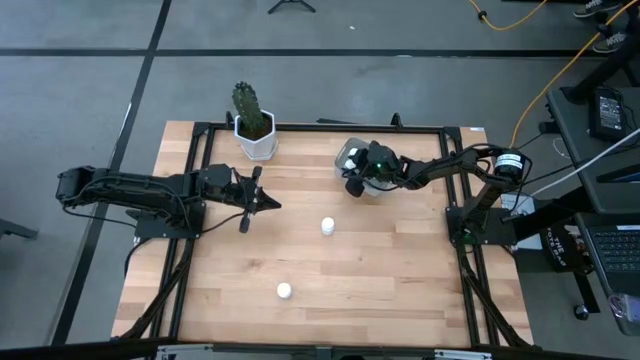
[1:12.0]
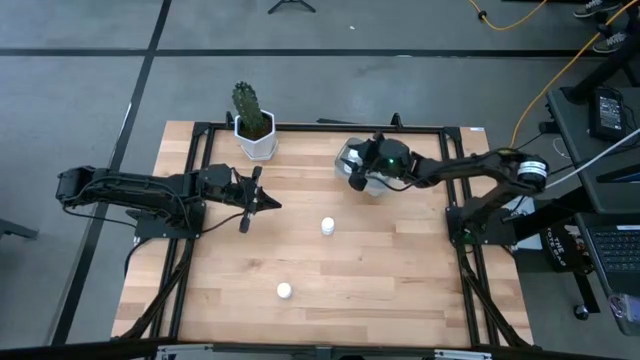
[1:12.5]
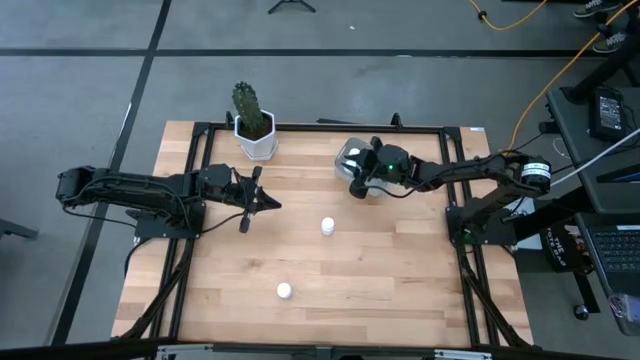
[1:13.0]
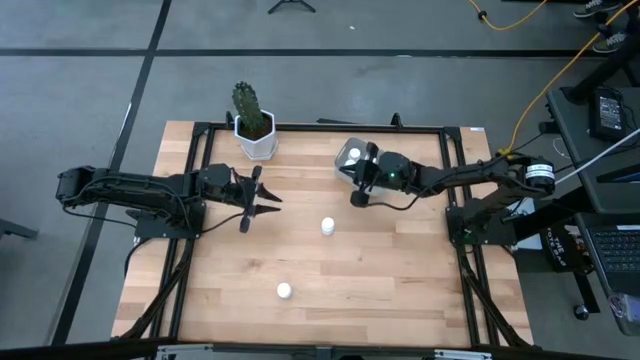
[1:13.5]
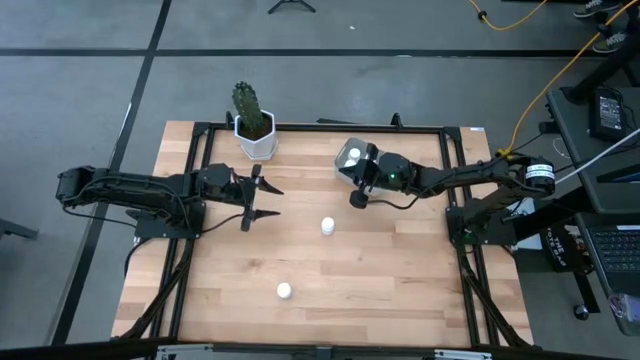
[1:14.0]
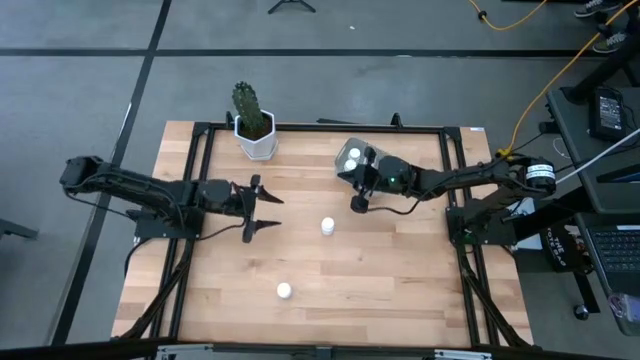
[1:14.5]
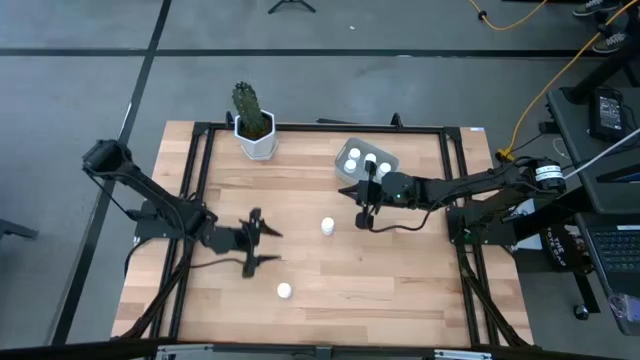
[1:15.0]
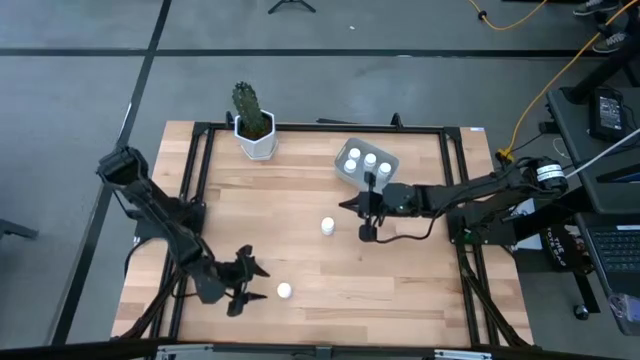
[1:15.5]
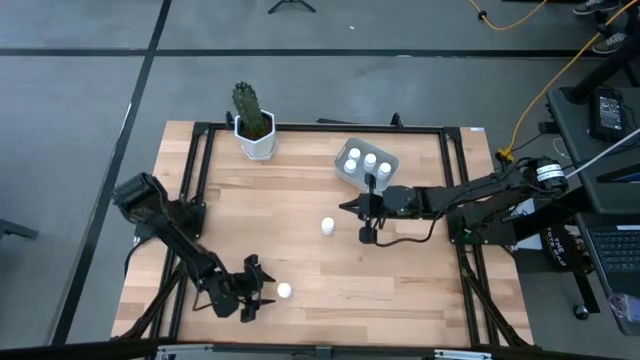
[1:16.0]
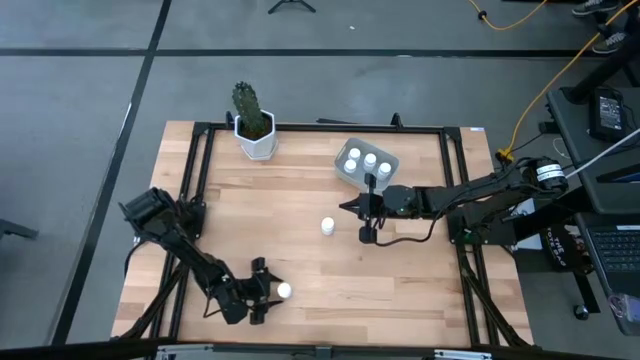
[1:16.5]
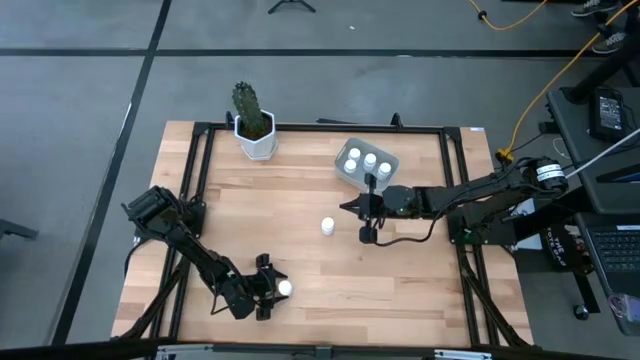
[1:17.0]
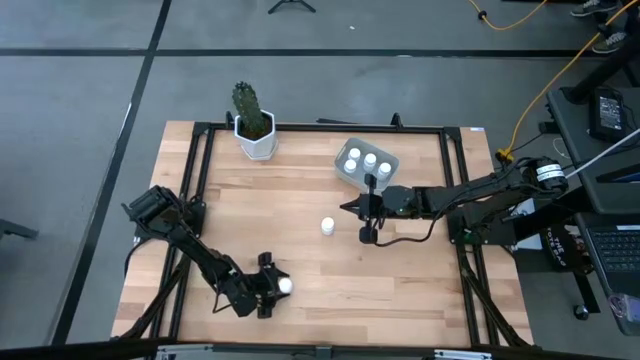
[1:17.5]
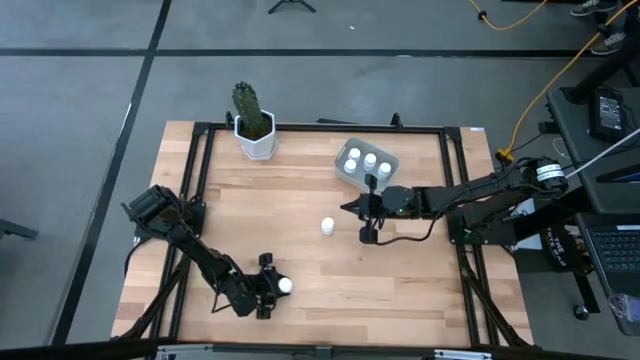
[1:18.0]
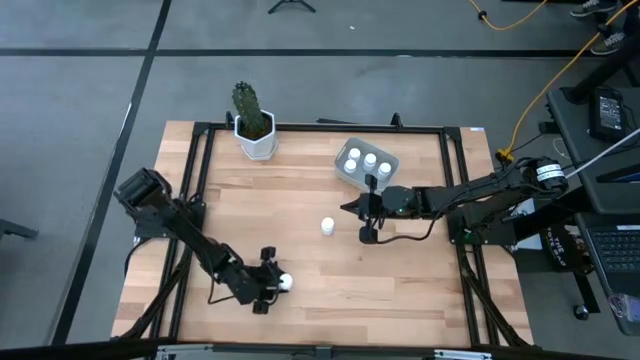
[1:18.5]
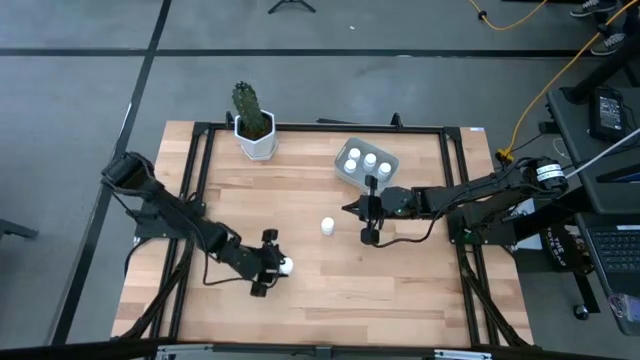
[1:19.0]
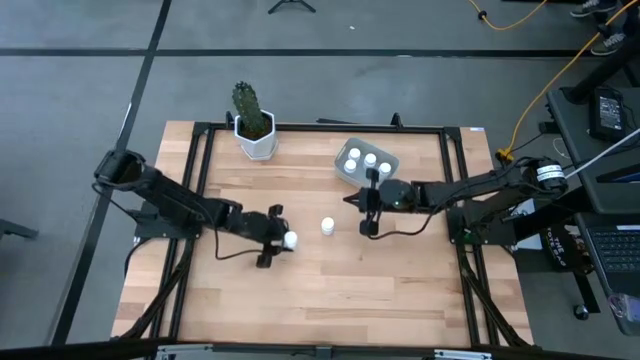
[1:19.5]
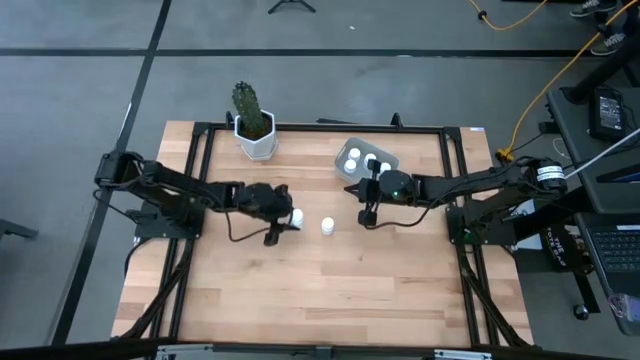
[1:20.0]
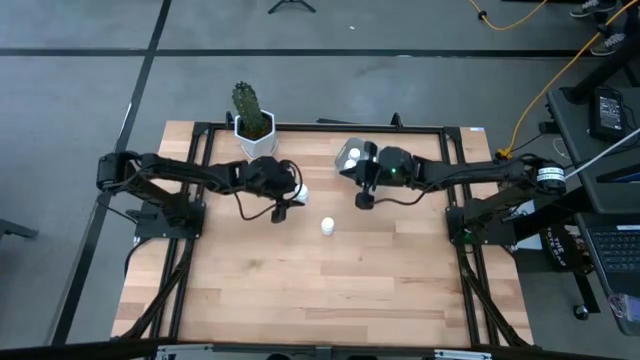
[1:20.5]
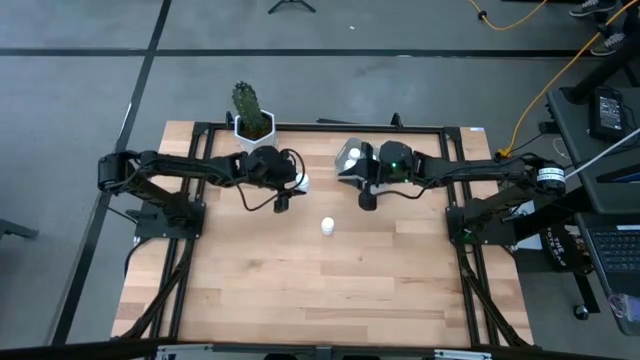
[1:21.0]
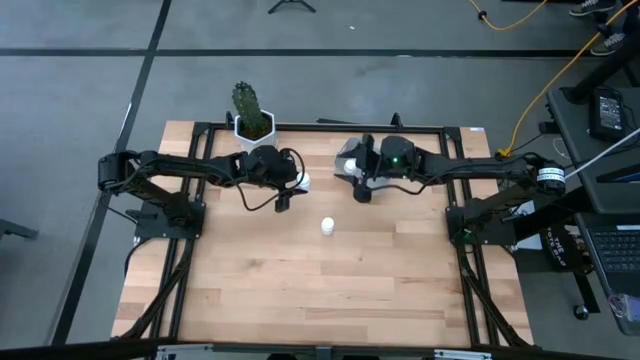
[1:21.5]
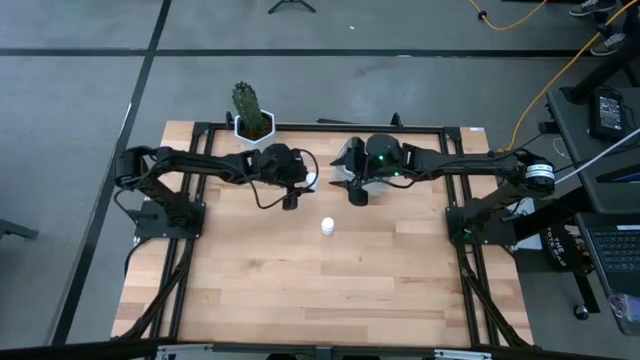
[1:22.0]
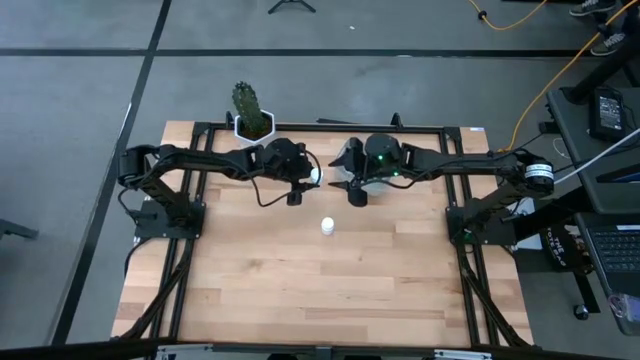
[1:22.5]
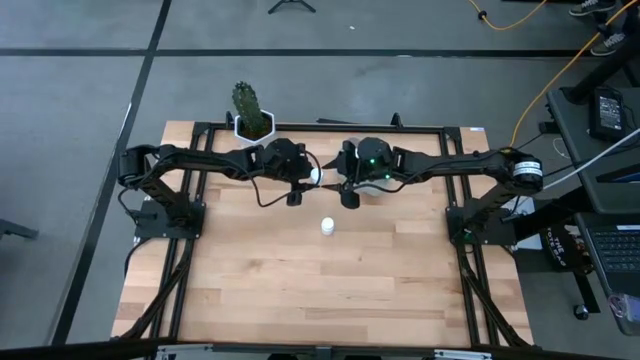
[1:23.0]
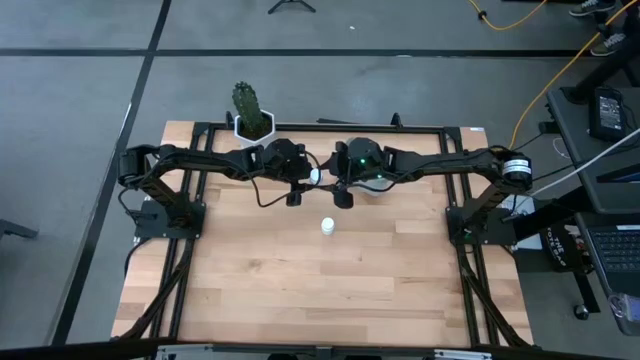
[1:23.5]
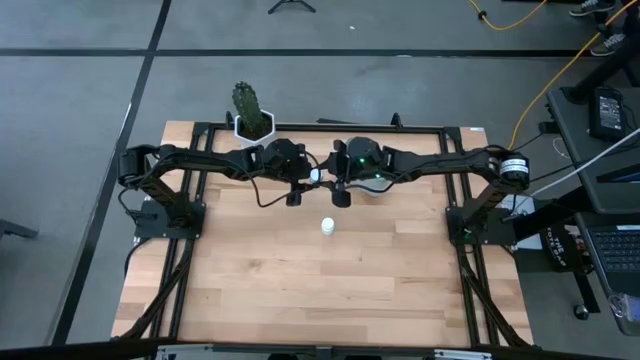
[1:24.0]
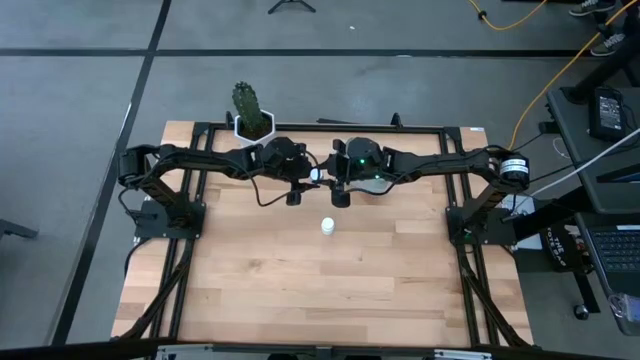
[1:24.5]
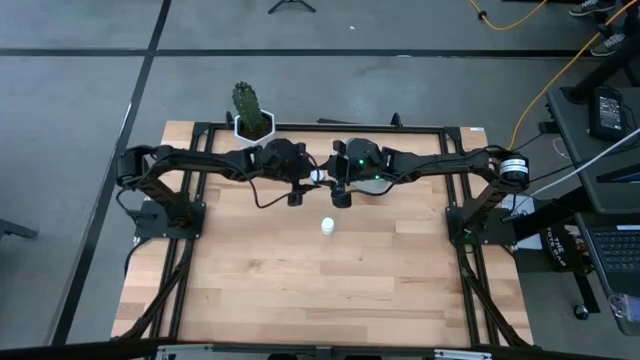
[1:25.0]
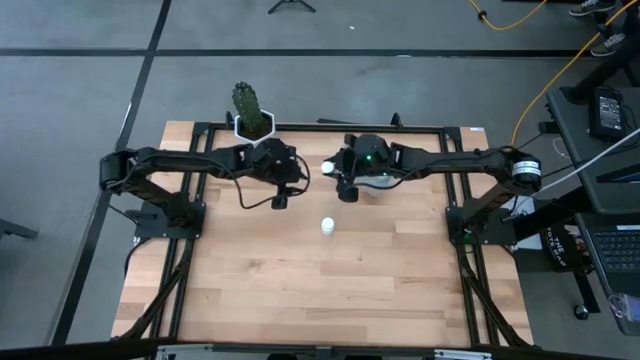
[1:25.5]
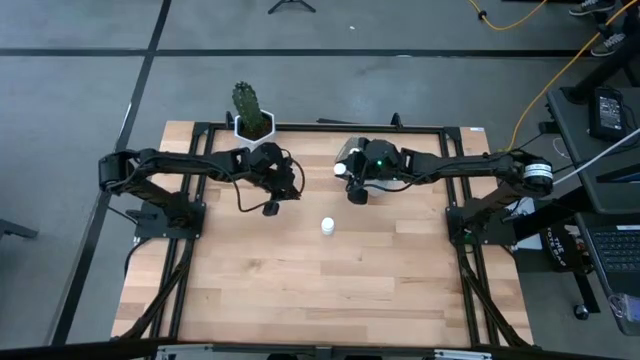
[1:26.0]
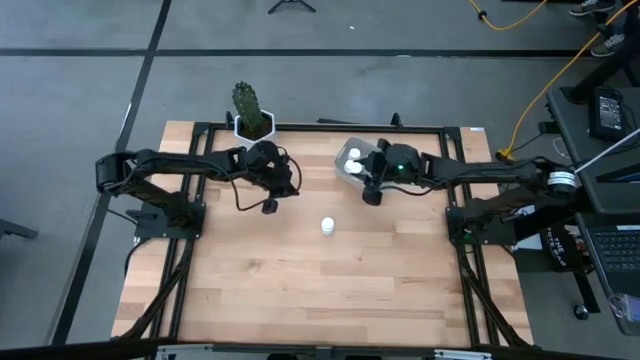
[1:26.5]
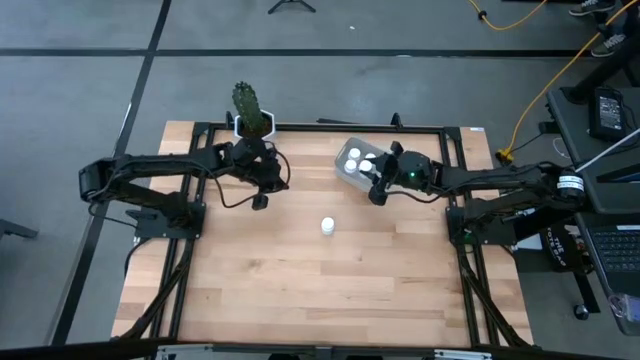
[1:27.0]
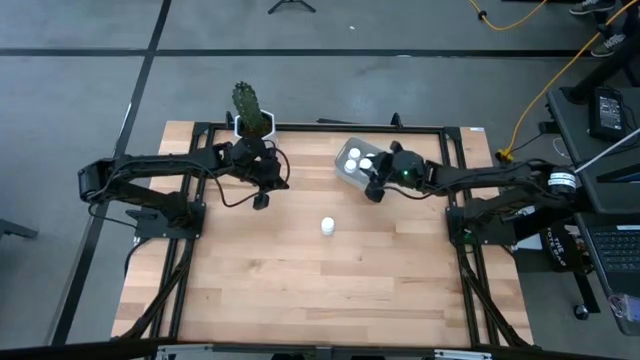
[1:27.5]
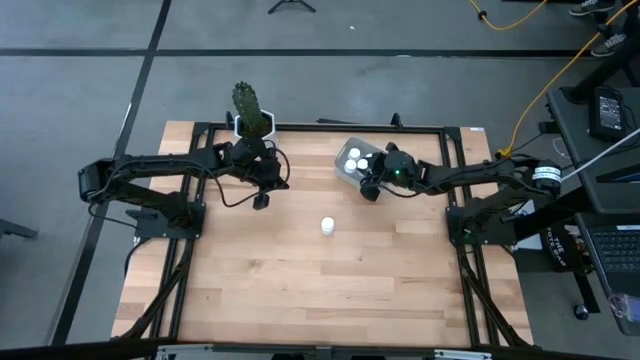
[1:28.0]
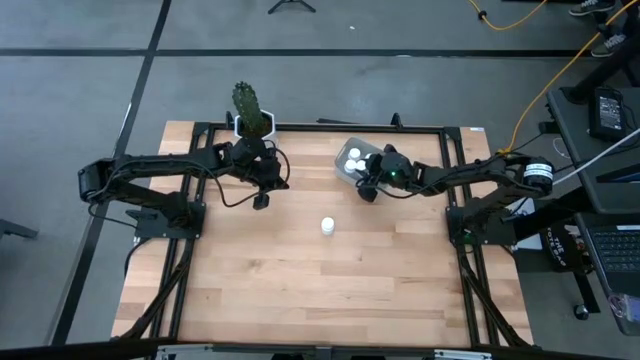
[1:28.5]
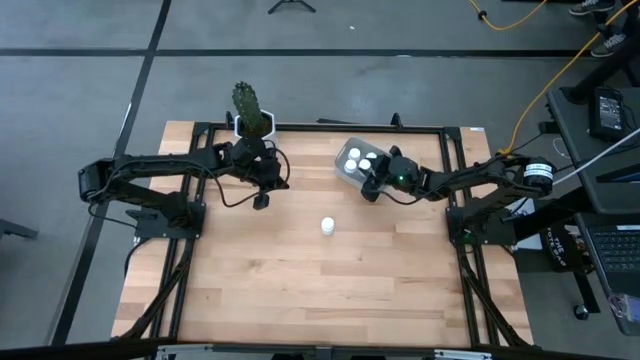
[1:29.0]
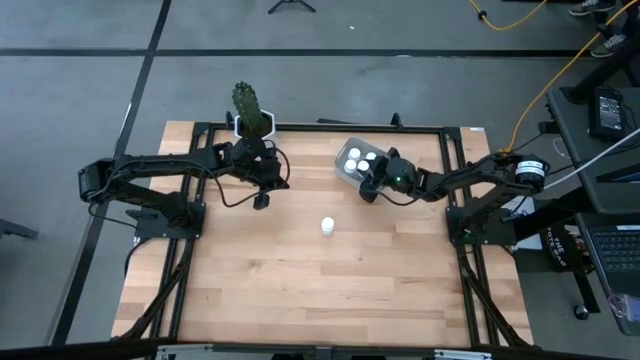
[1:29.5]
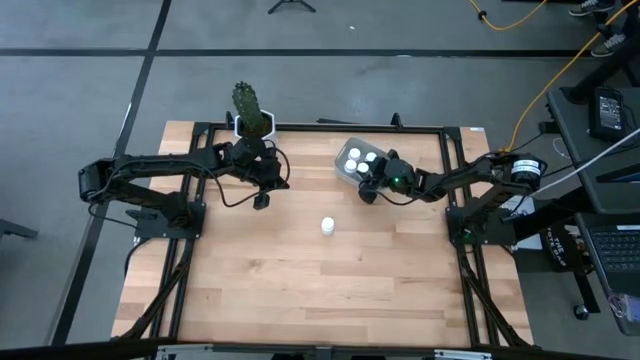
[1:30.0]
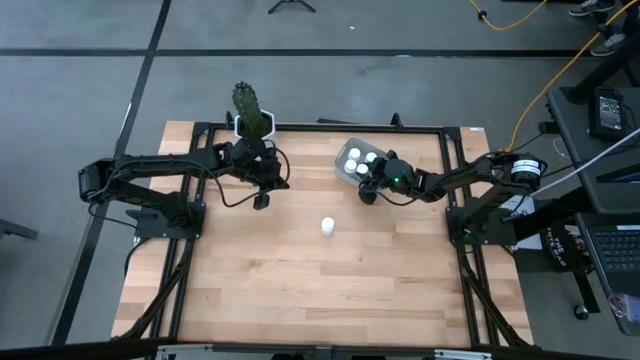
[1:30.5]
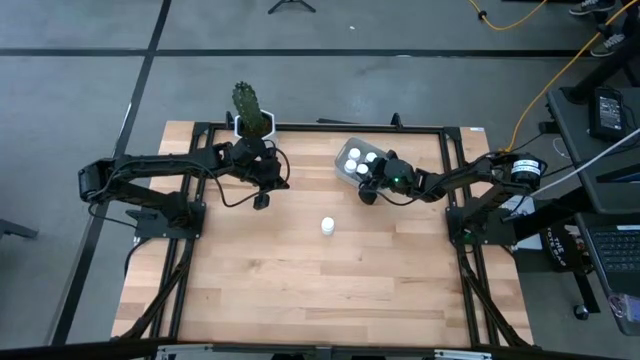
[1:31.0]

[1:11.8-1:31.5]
Task: Pick and place pill bottles into a basket
Put the white pill bottle into the gray bin

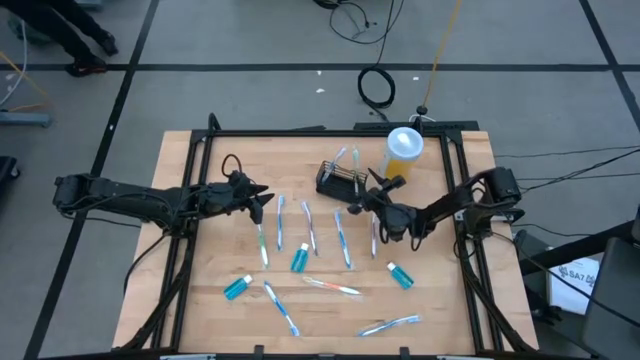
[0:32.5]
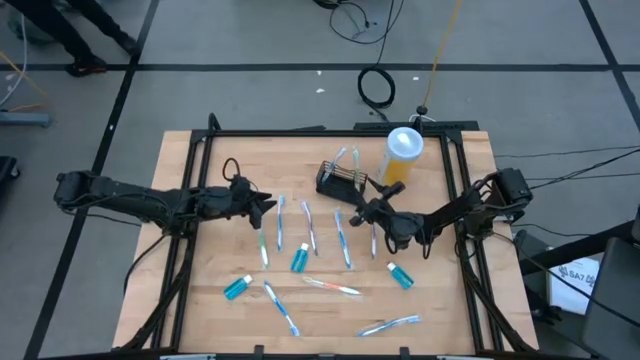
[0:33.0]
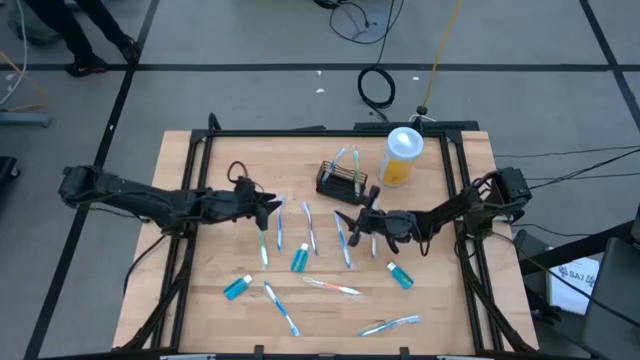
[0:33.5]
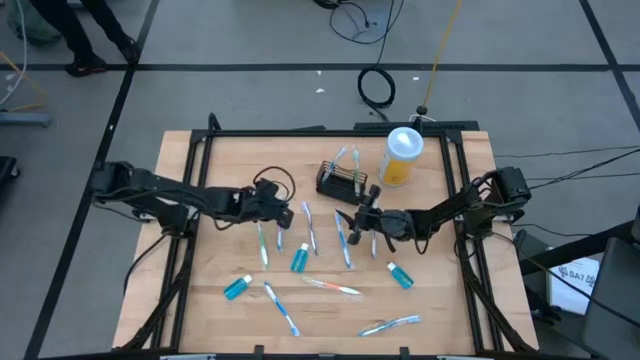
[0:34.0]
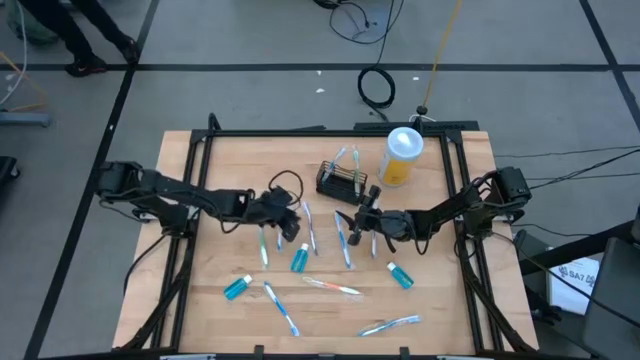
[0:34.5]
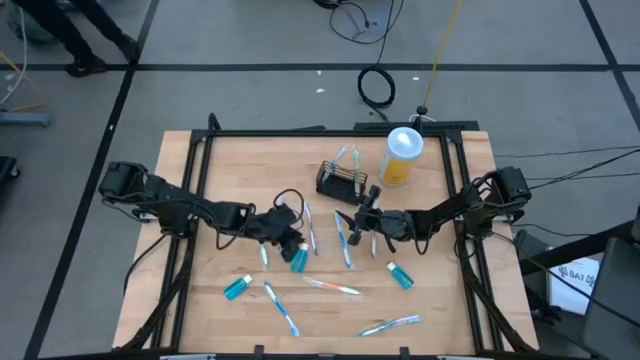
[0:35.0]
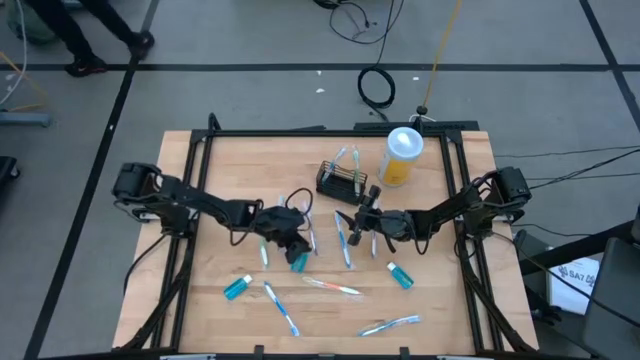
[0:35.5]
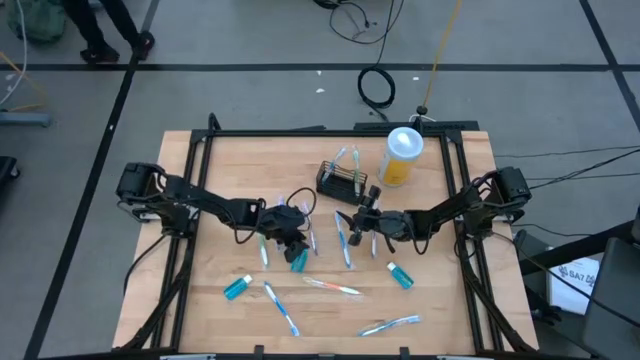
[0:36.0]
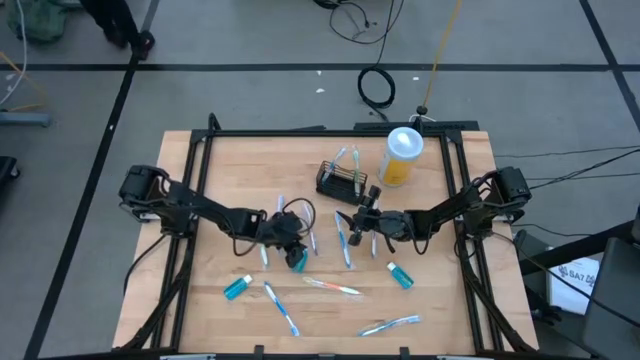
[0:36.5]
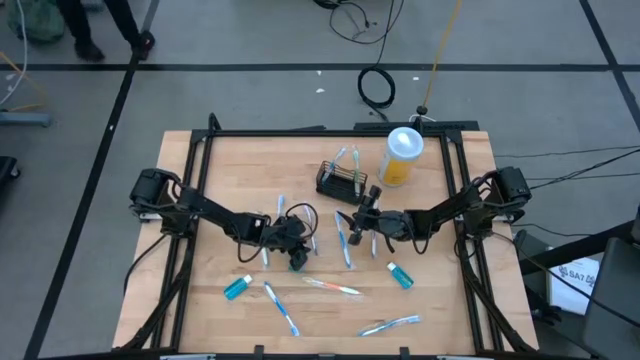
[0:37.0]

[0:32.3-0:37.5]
Task: Pick & Place toothbrushing station
Put the blue mouthwash bottle into the black organizer
